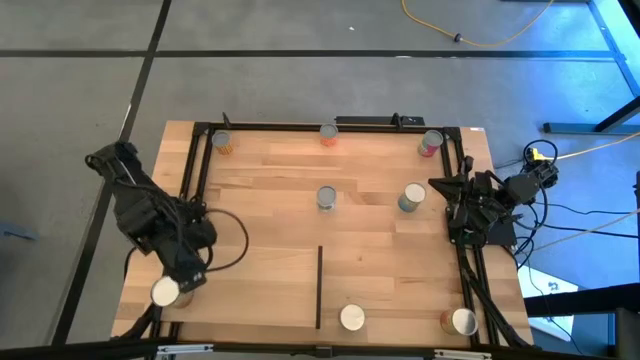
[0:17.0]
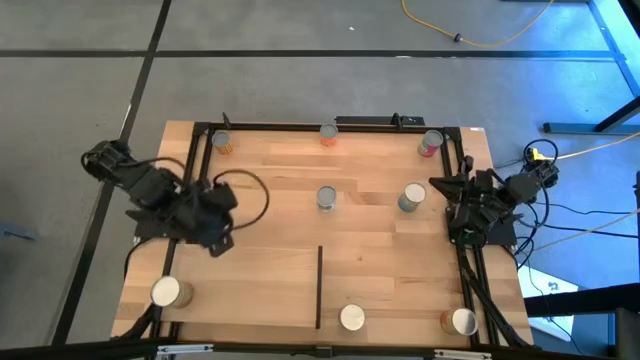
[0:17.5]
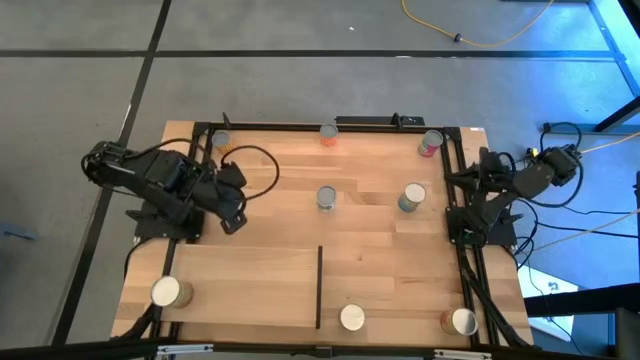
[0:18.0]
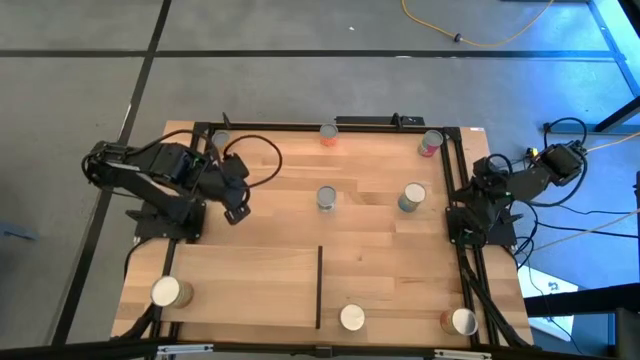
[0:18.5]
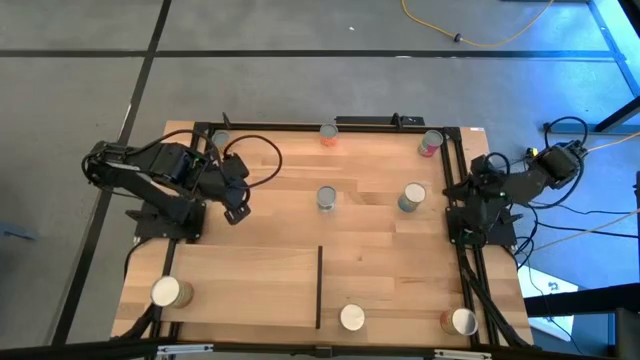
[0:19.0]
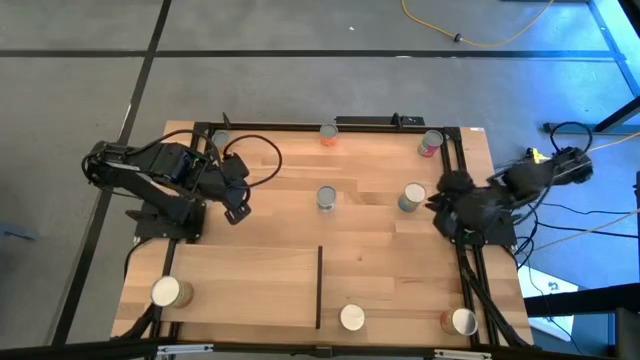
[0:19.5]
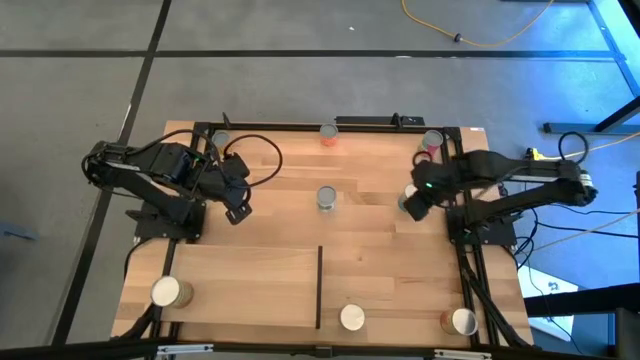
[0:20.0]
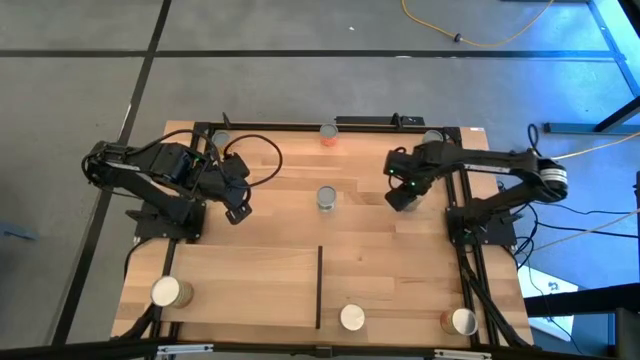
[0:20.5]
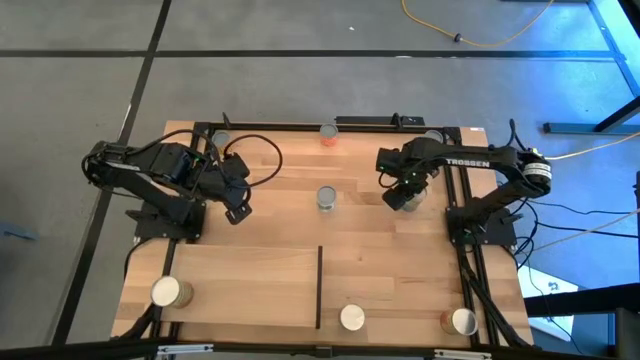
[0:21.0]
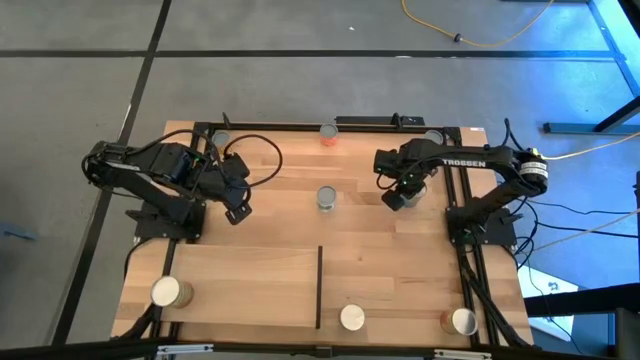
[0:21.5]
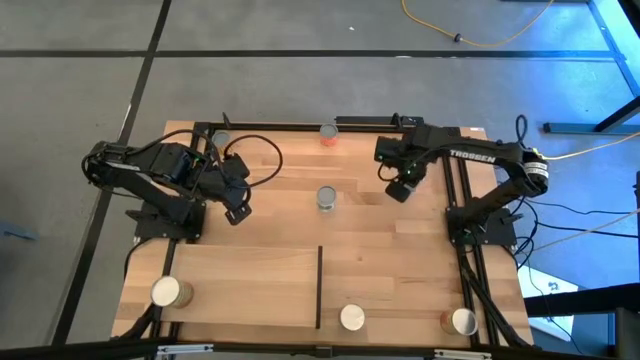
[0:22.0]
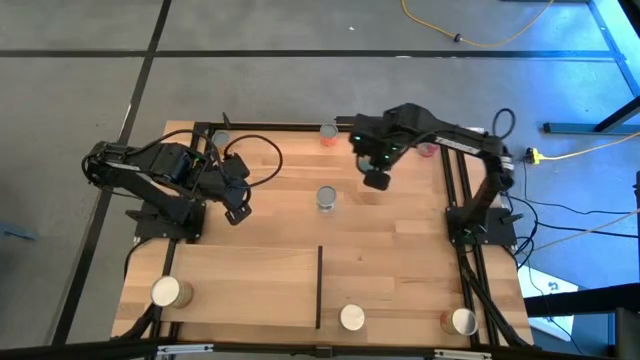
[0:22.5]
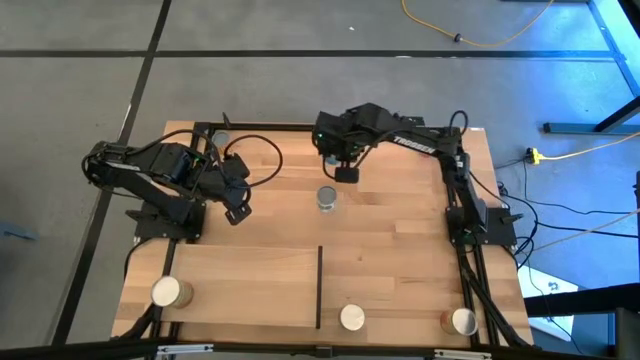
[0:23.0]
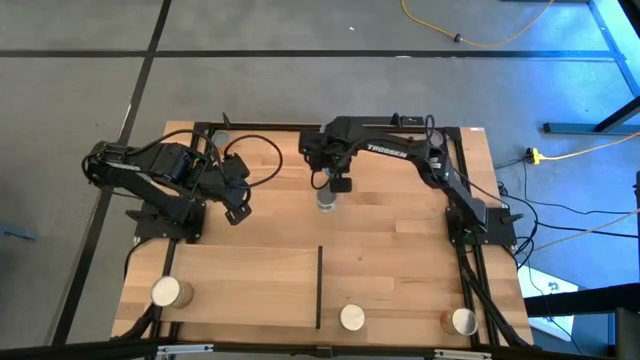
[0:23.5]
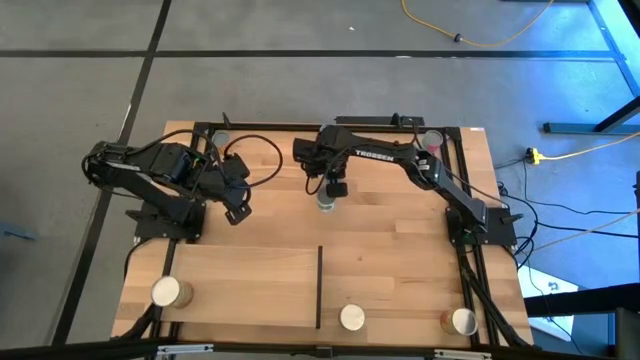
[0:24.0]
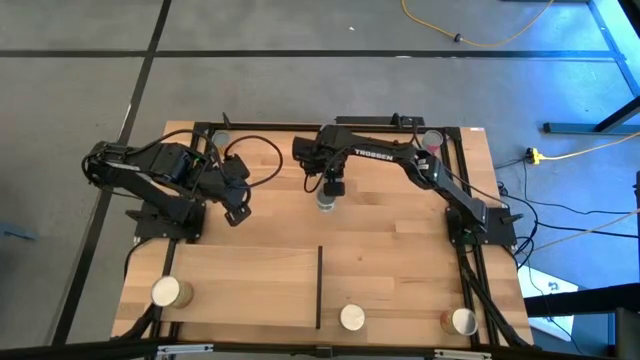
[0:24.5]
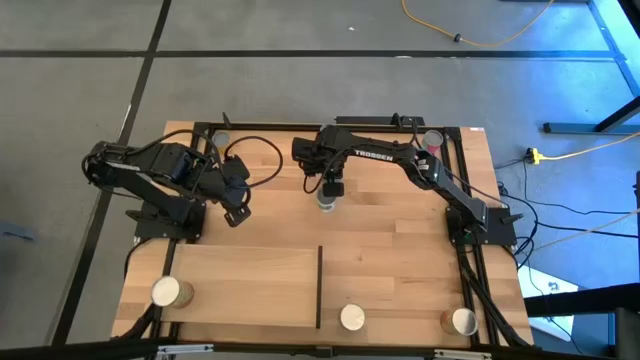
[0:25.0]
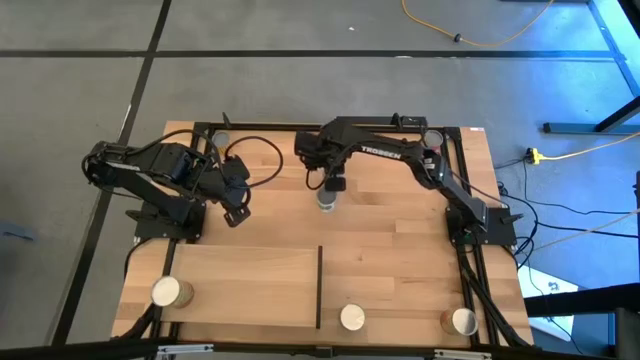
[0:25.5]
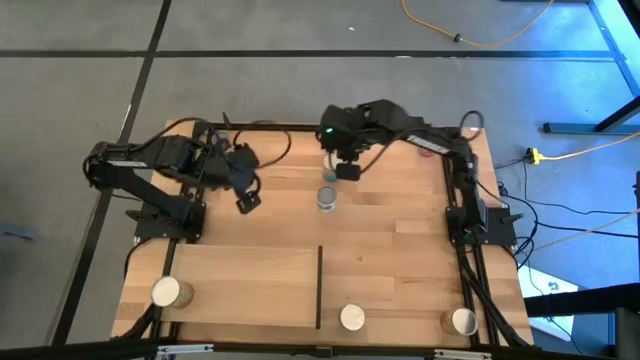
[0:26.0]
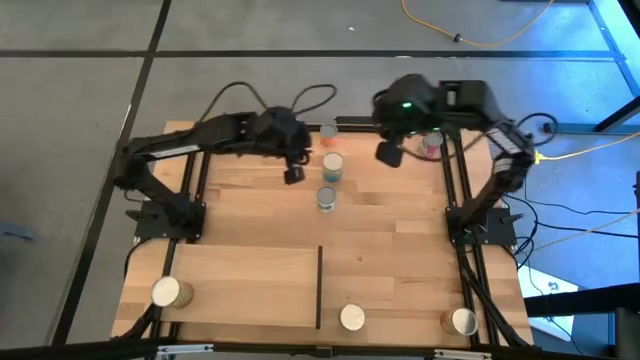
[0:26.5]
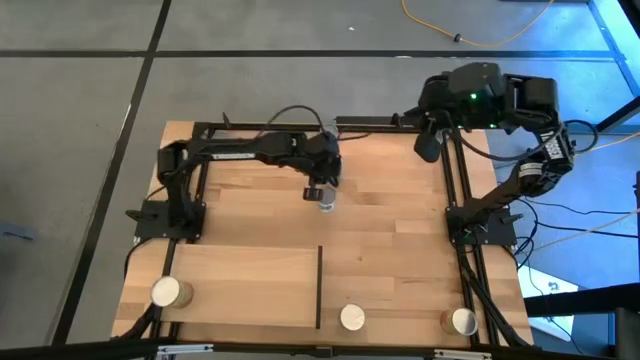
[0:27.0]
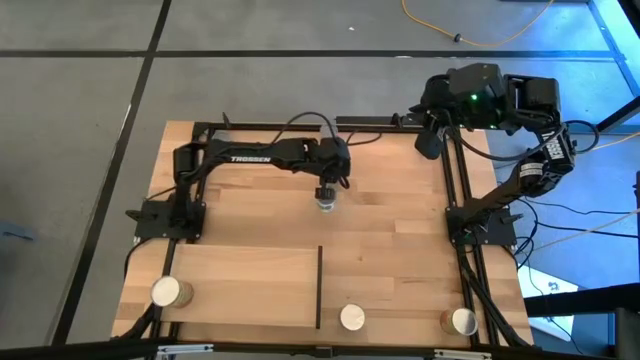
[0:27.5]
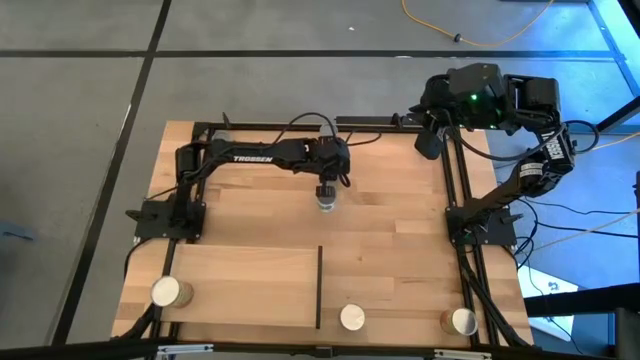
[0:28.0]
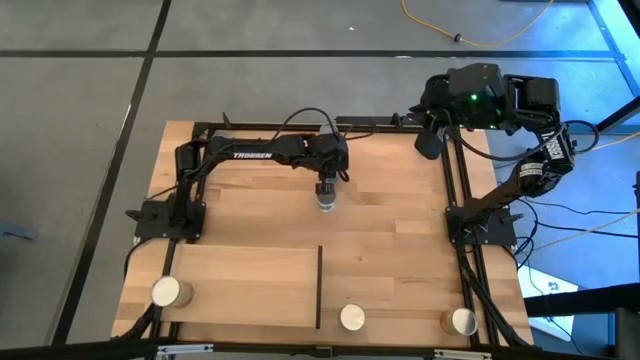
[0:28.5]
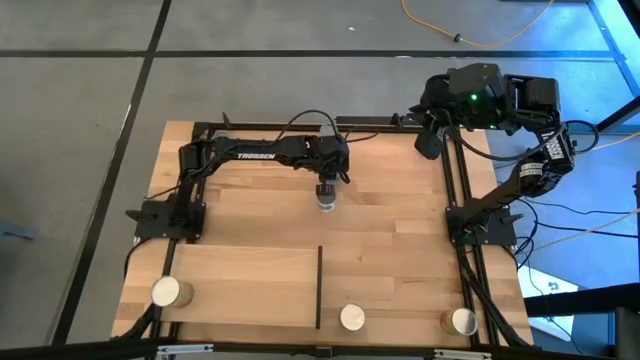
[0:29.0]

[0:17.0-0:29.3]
Task: Pick and place cans onto a shelf
Put the top canned cherries on the shelf

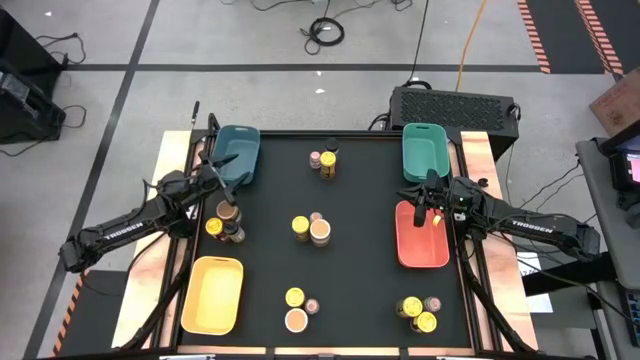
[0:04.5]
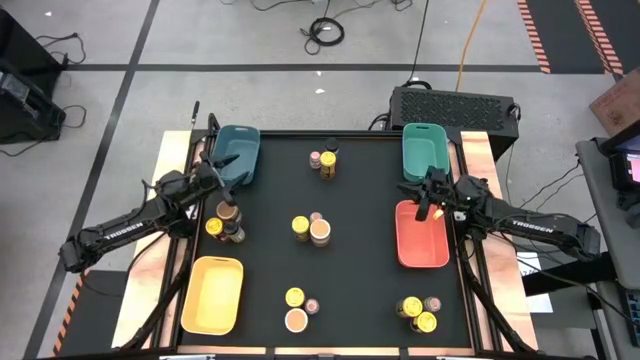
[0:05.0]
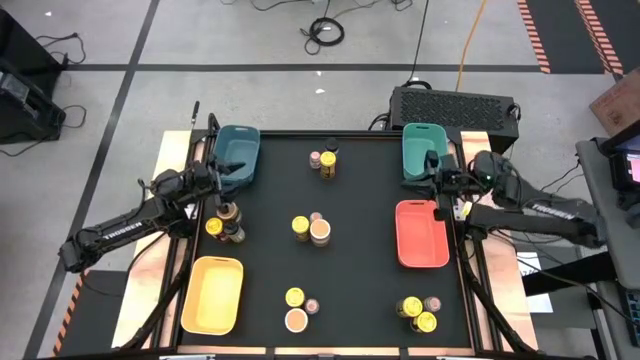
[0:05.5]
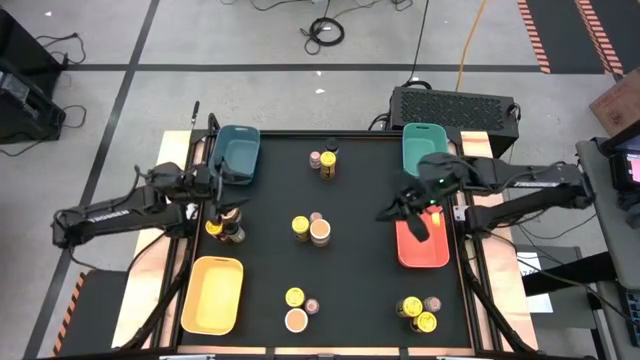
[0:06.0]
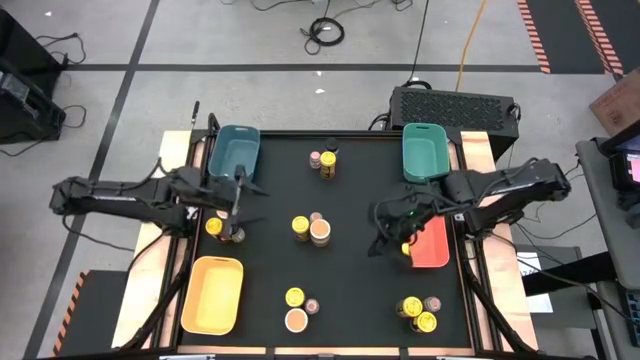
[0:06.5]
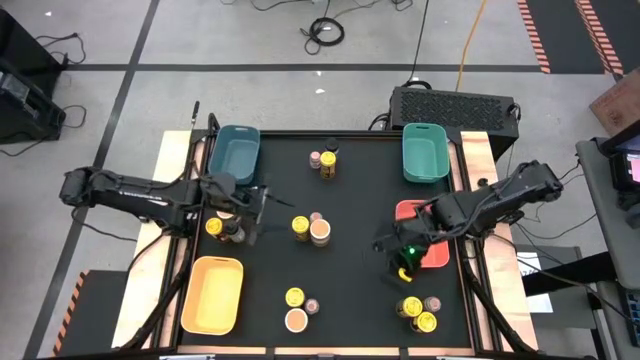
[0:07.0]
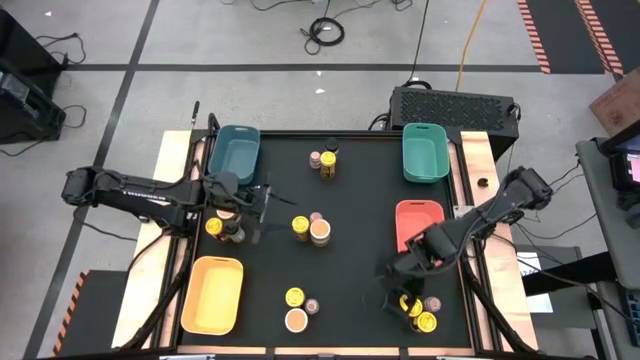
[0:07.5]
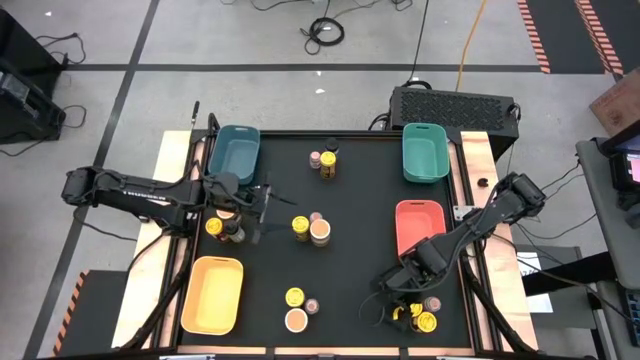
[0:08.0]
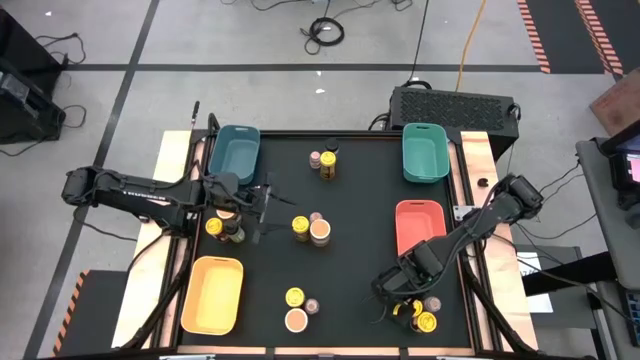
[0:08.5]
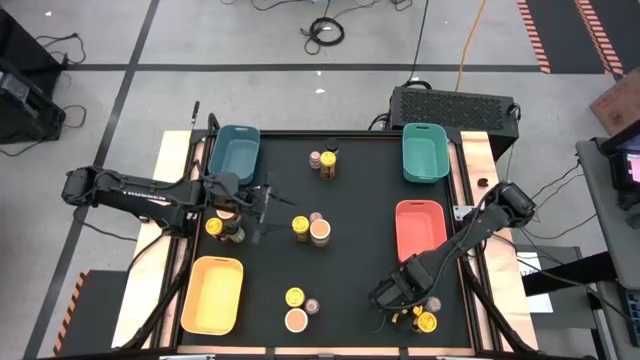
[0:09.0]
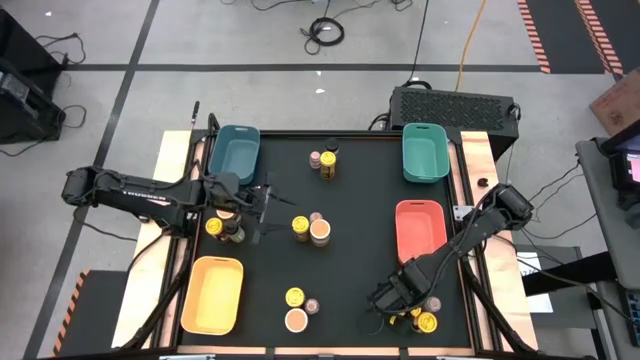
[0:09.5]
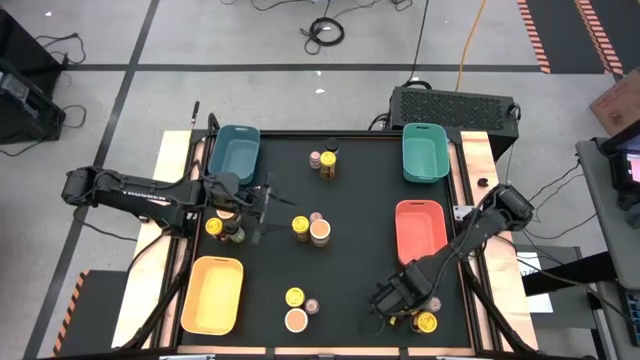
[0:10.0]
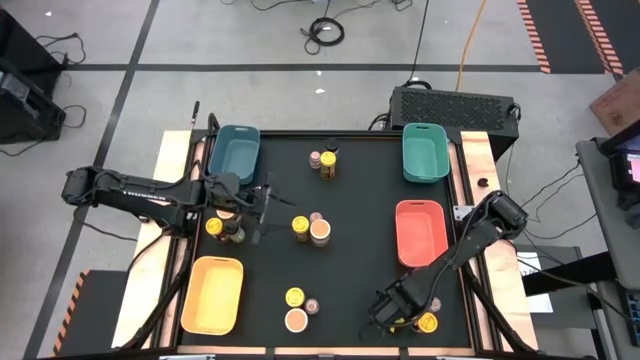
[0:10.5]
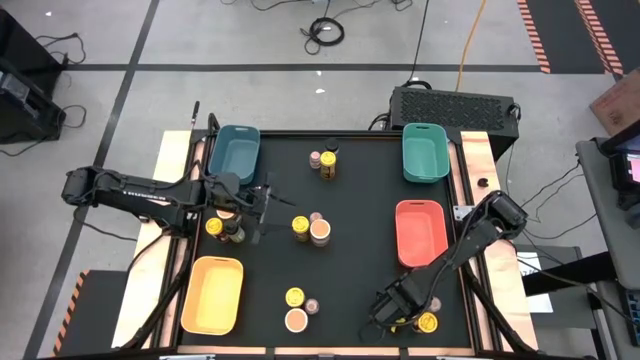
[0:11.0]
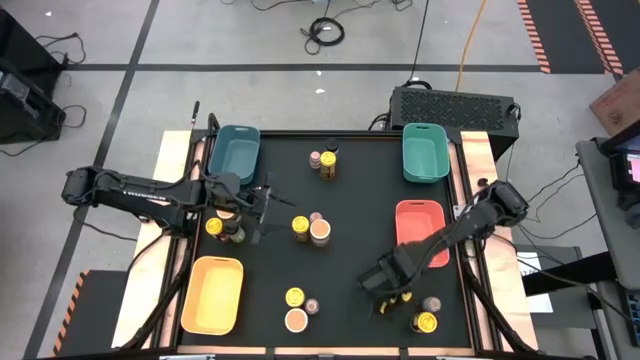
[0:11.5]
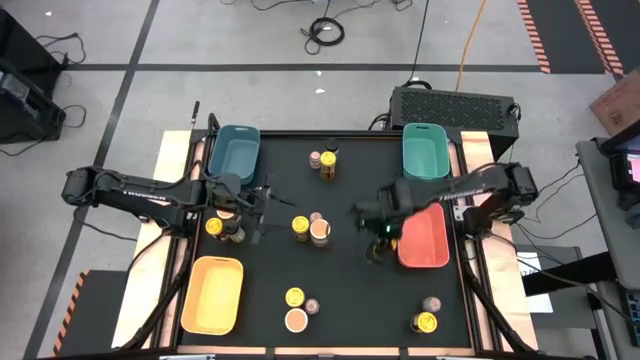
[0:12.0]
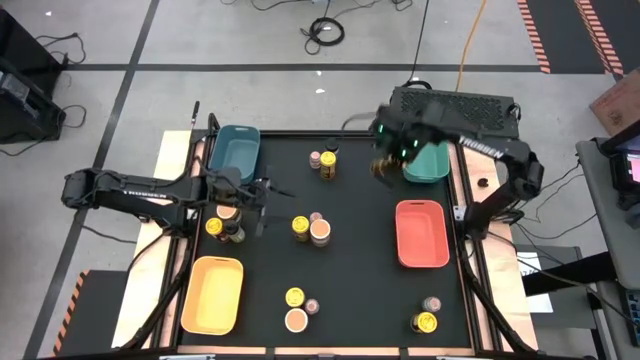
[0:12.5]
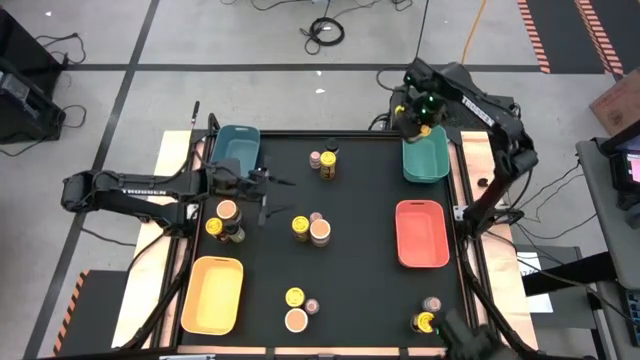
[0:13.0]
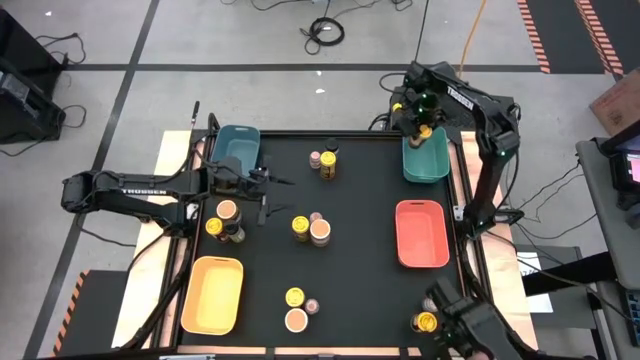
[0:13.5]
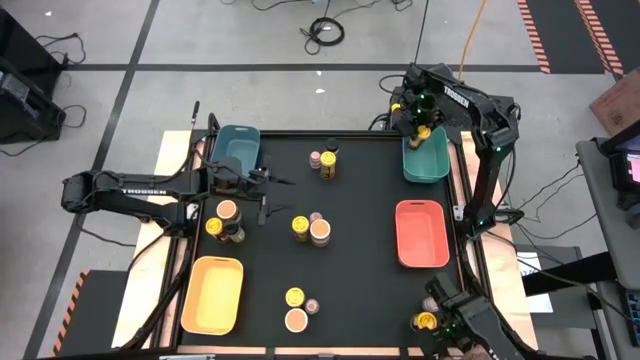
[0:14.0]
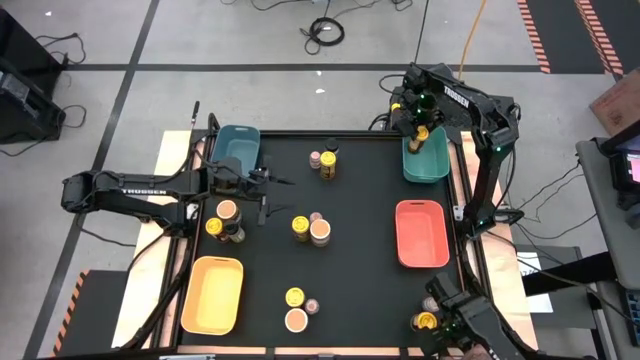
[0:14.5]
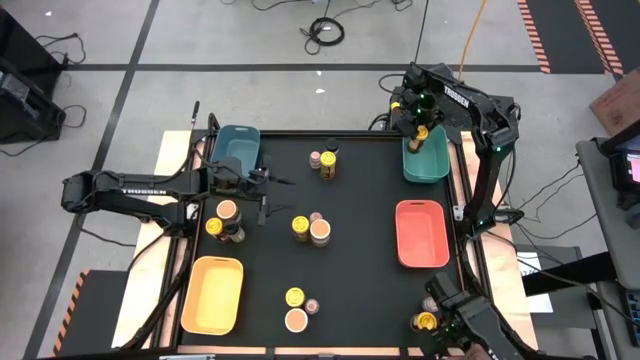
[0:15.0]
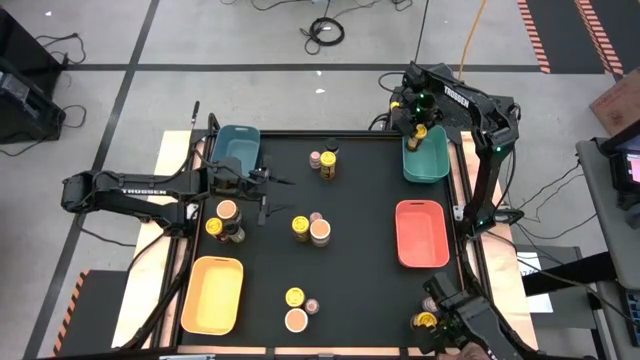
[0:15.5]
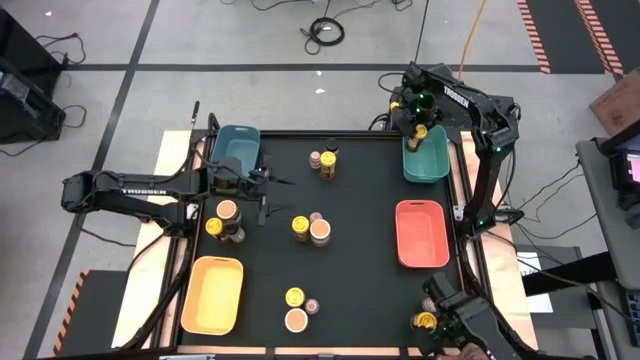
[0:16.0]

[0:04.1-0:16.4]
Task: Sort spices by type
Put the yellow spice bottle into the green bin
